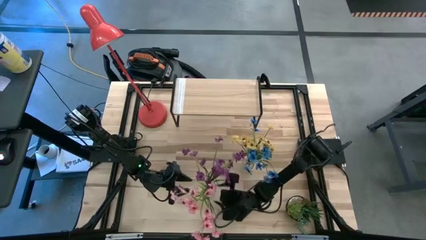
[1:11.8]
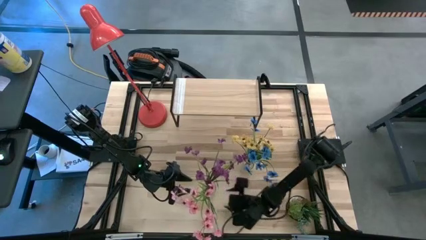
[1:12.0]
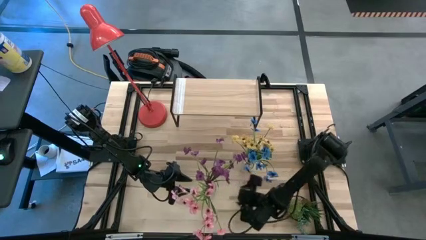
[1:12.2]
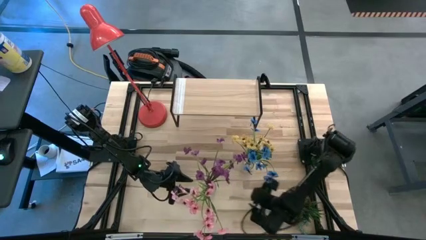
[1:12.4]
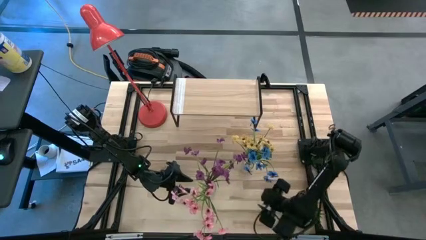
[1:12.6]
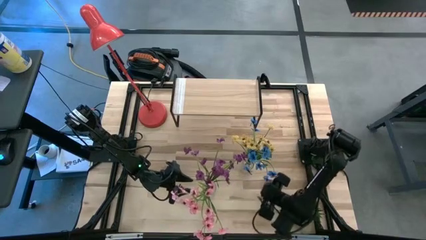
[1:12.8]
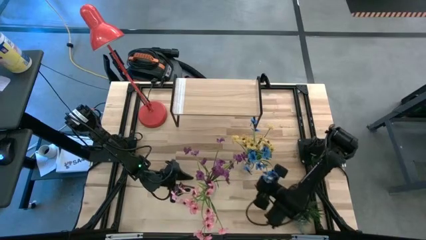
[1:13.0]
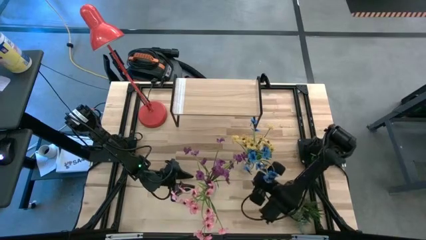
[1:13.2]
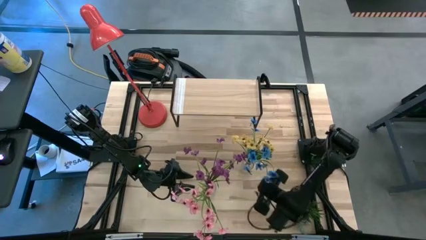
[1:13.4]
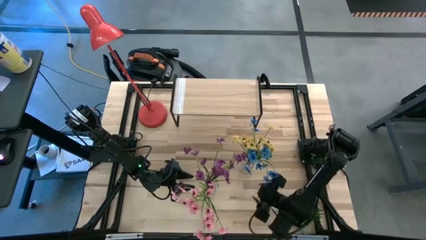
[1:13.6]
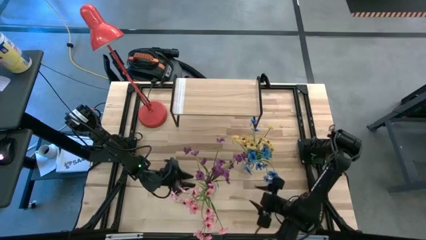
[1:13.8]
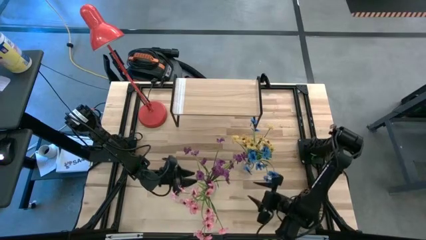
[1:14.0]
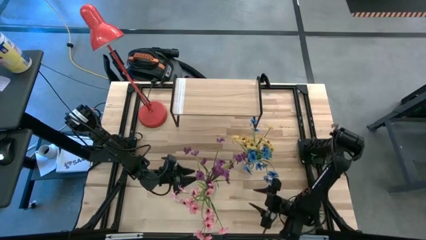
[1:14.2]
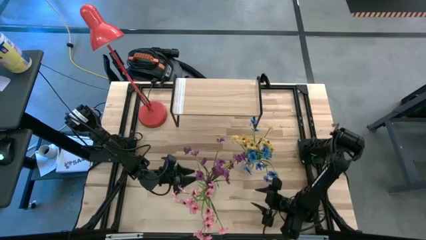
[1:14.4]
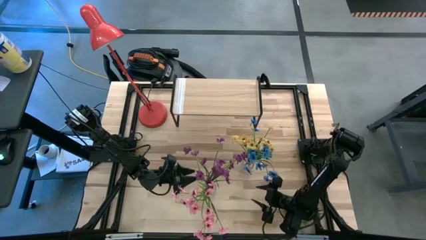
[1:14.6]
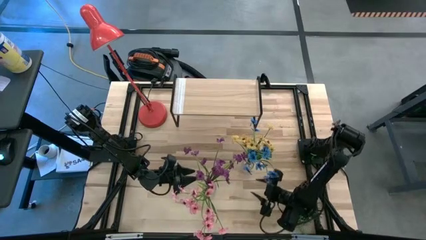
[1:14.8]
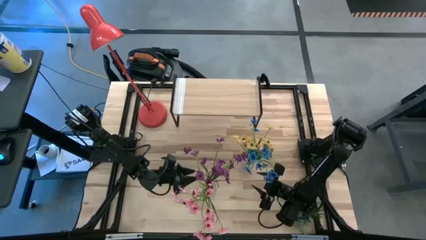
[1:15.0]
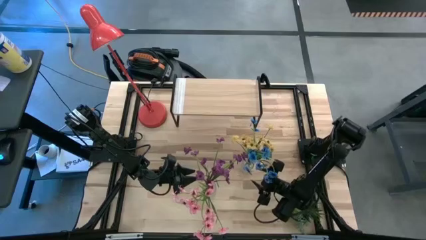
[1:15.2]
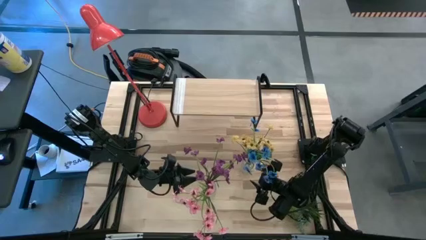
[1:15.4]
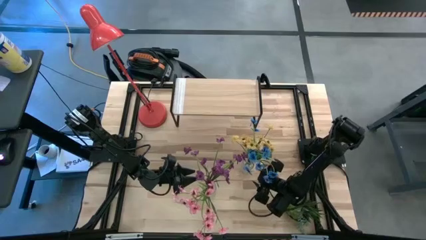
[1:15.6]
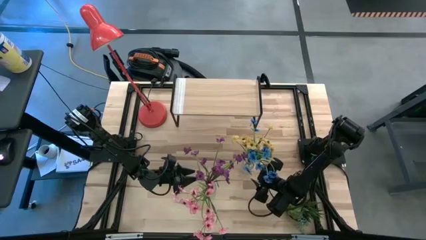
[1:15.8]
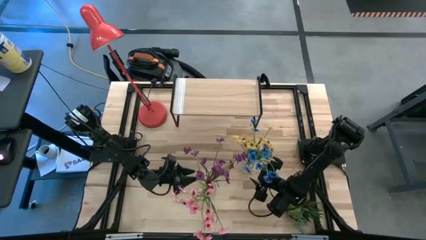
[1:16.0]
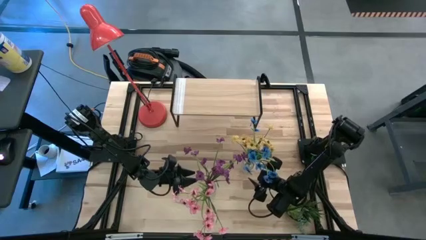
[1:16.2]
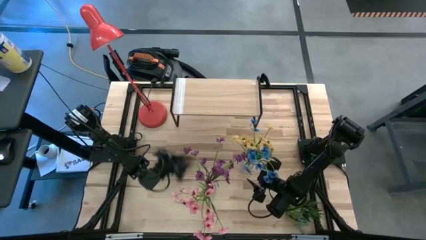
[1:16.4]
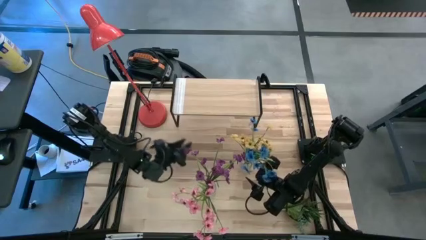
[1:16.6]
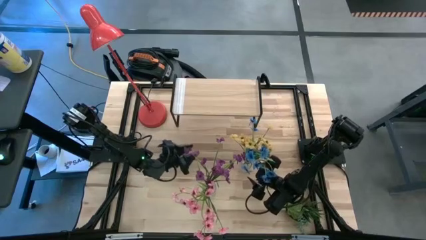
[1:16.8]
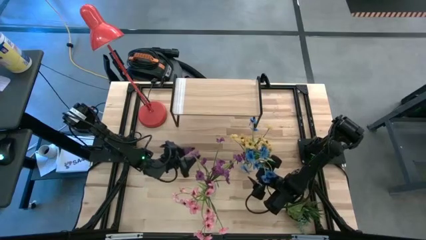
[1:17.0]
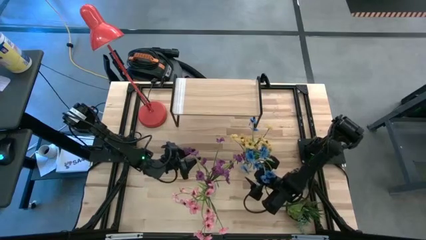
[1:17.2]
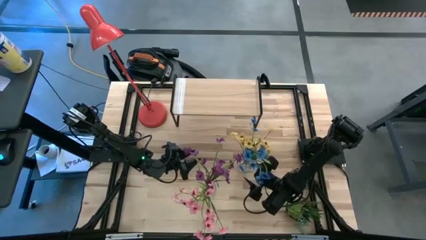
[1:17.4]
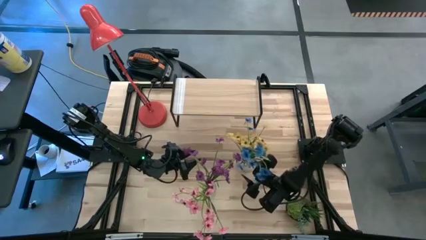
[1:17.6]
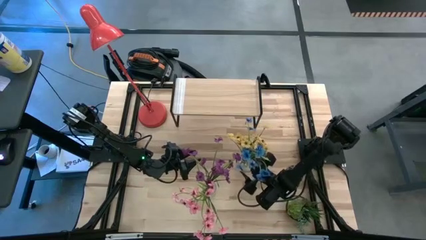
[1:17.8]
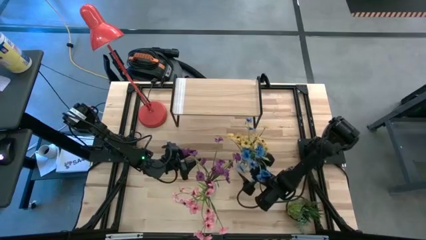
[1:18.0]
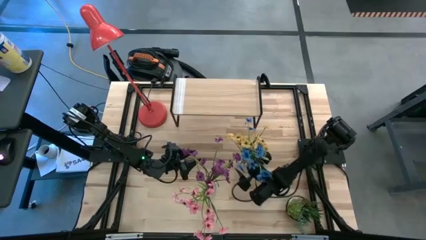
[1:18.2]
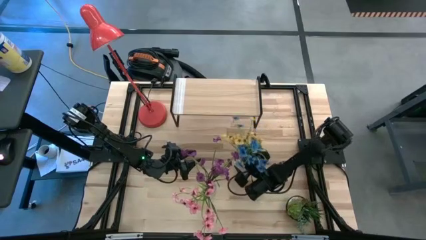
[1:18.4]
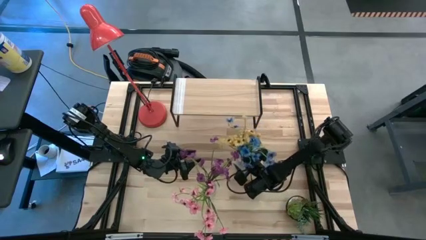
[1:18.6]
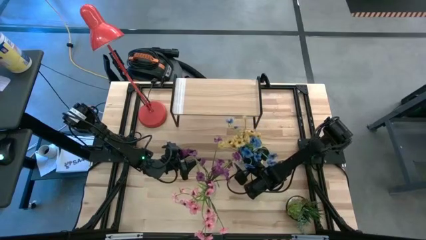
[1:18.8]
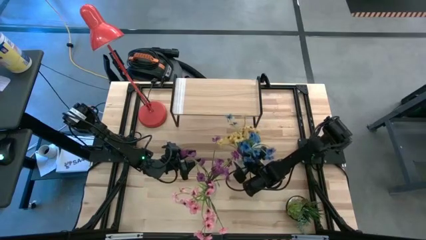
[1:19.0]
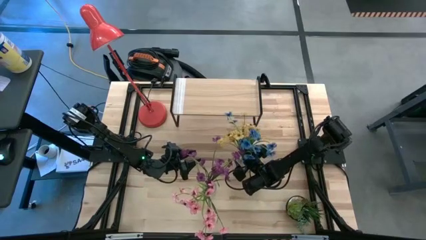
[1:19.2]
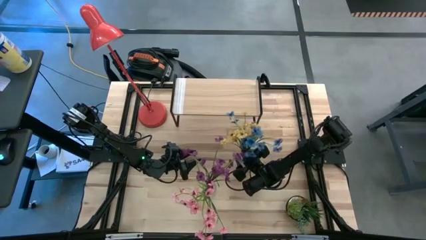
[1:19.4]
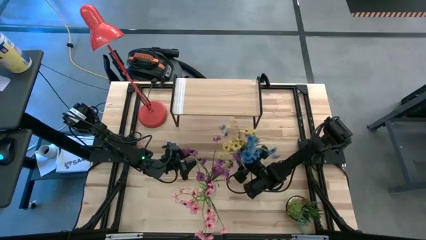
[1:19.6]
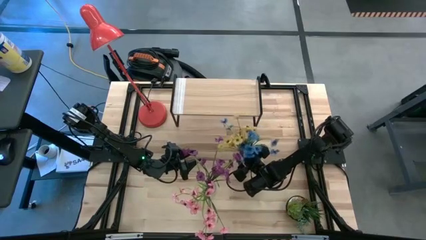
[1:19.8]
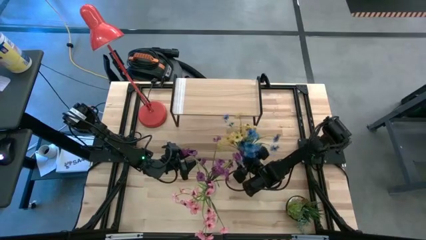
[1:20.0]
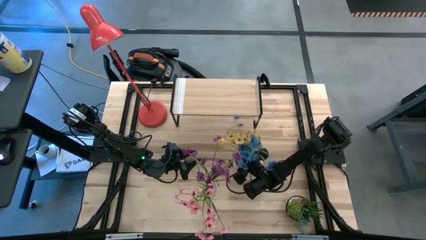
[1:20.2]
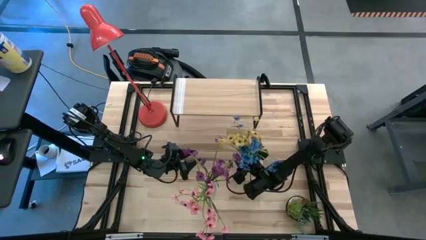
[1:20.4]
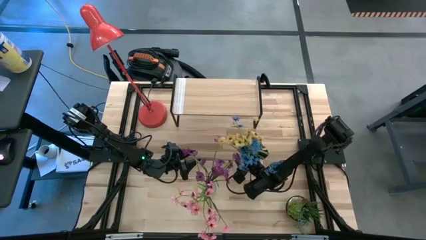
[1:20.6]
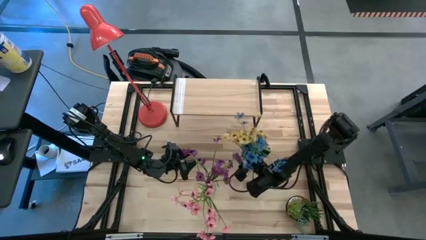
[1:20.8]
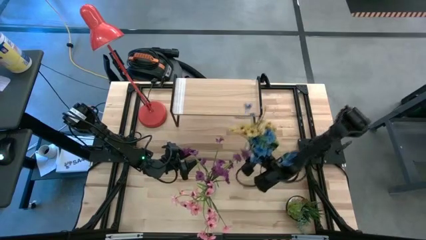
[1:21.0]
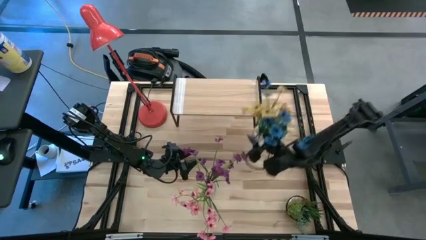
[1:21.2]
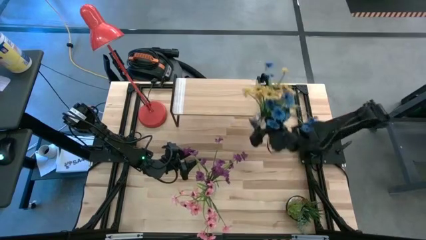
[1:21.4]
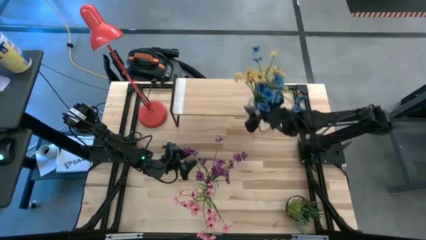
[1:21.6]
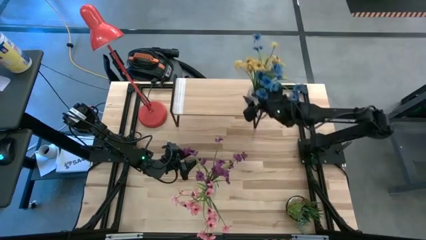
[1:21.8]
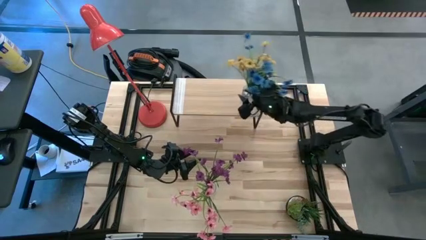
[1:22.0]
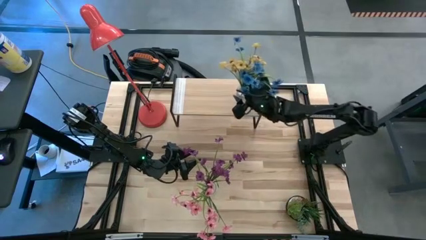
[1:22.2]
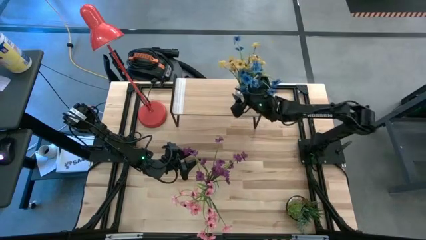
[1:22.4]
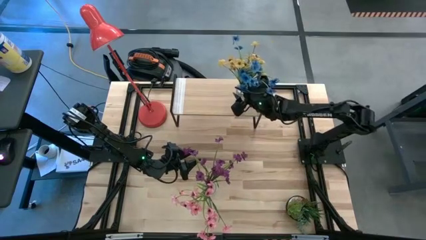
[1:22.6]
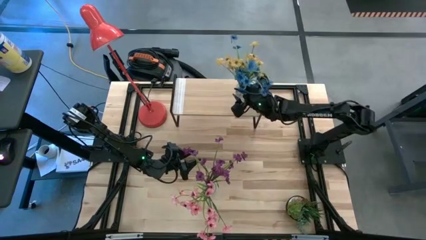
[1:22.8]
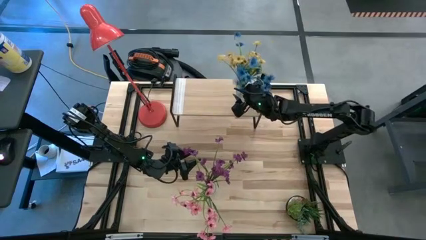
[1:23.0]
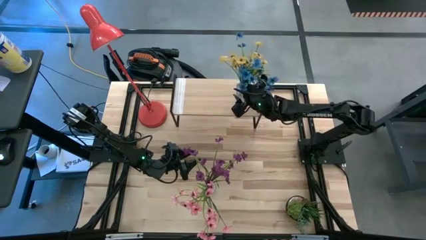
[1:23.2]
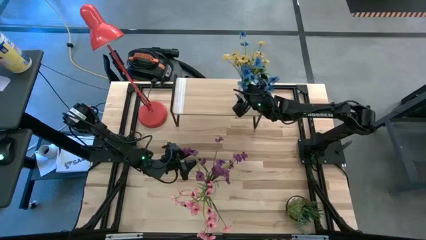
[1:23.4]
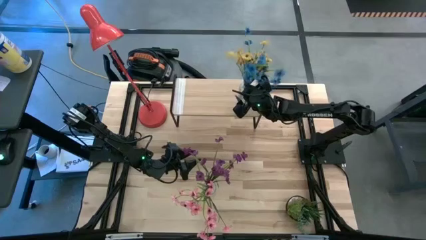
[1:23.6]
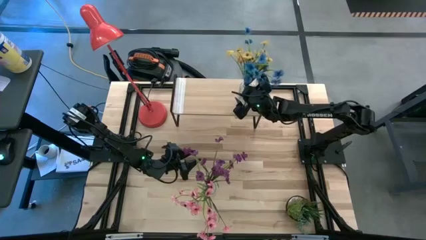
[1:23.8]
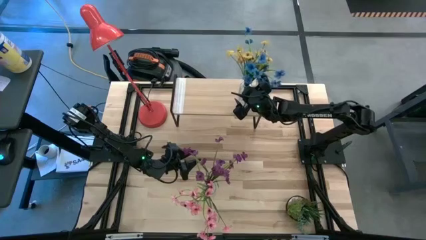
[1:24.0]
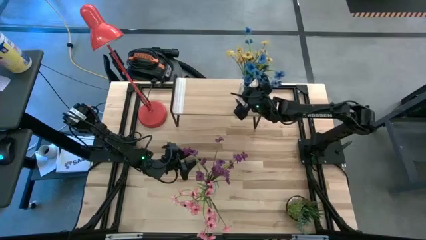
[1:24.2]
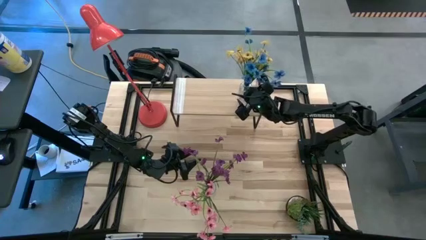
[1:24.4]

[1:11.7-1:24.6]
Task: Pick and place flowers into a vace then onto a shelf
Put the top vase on the shelf

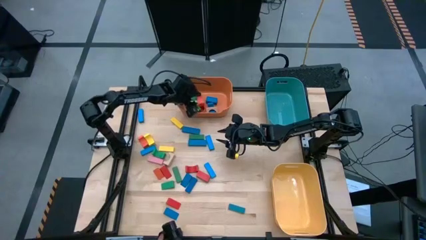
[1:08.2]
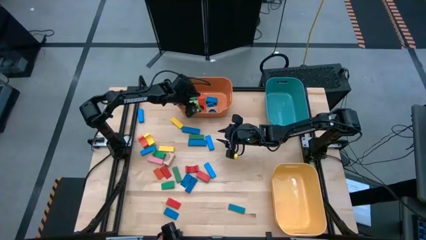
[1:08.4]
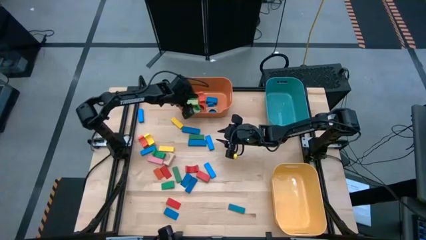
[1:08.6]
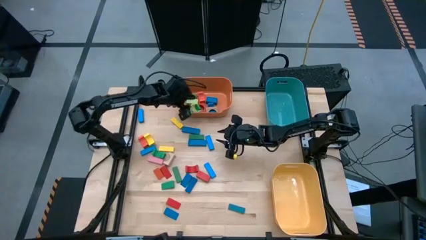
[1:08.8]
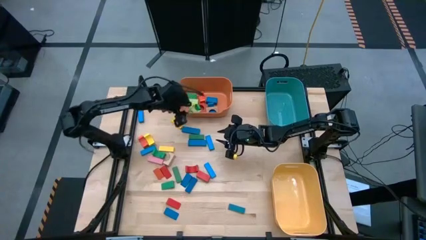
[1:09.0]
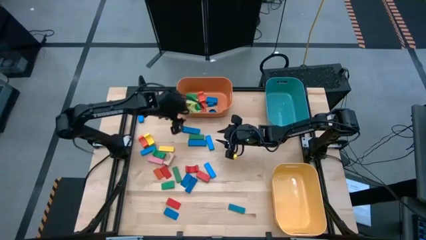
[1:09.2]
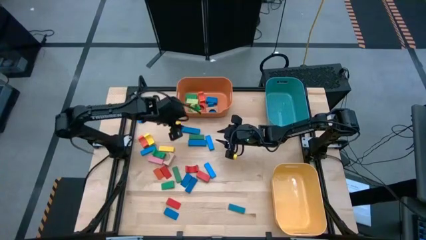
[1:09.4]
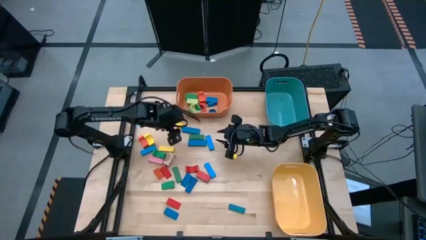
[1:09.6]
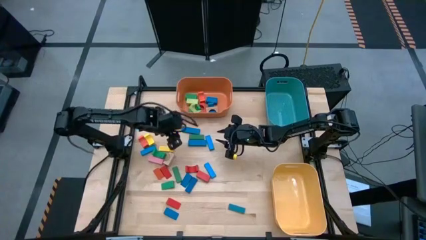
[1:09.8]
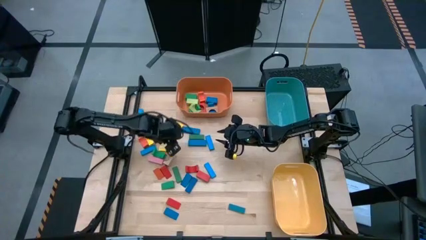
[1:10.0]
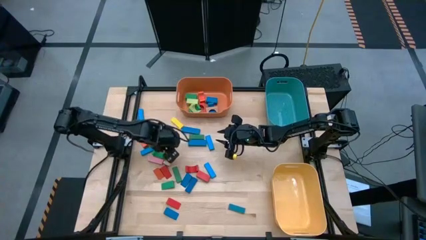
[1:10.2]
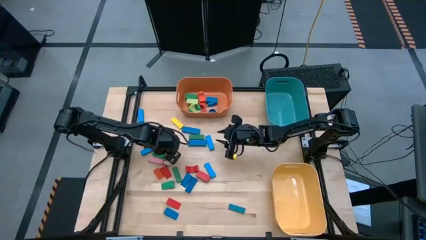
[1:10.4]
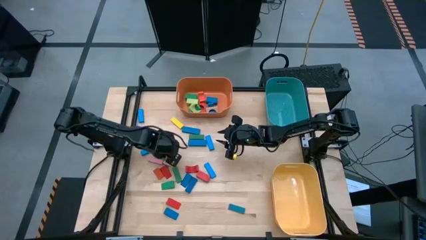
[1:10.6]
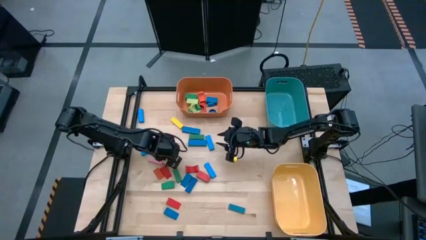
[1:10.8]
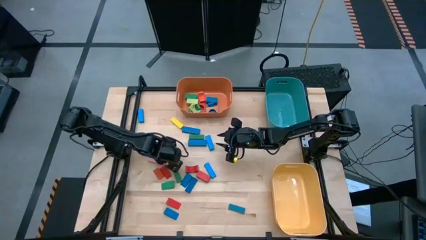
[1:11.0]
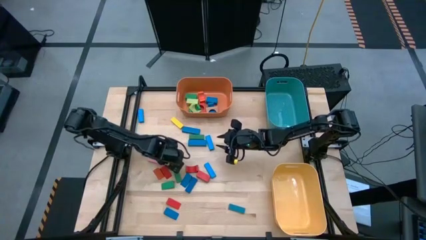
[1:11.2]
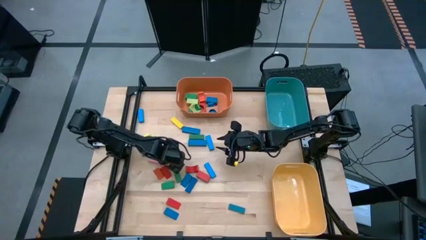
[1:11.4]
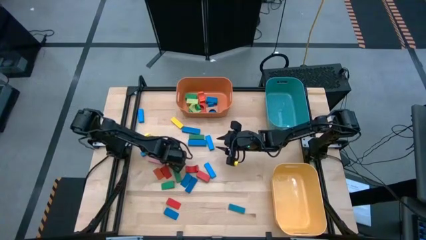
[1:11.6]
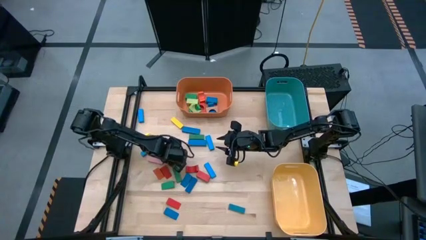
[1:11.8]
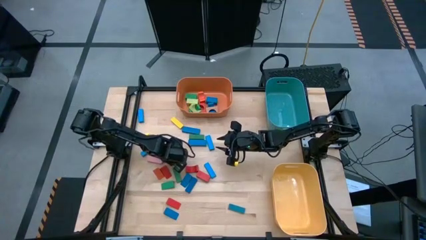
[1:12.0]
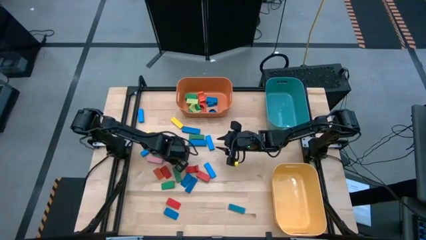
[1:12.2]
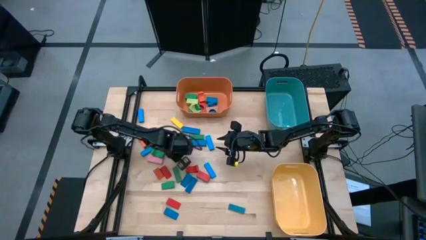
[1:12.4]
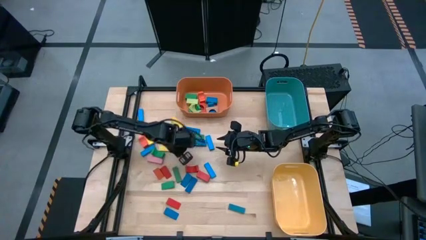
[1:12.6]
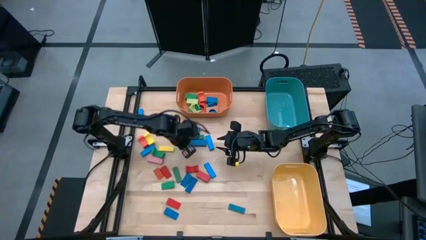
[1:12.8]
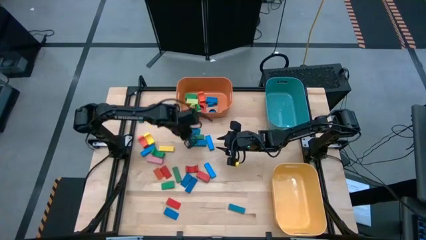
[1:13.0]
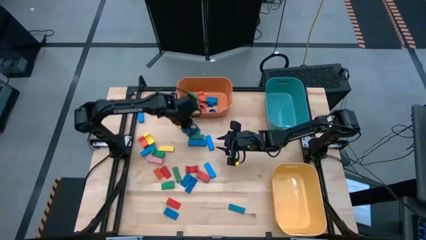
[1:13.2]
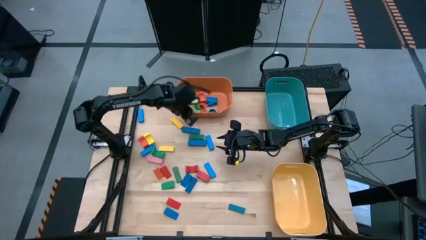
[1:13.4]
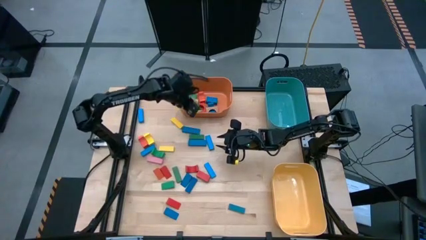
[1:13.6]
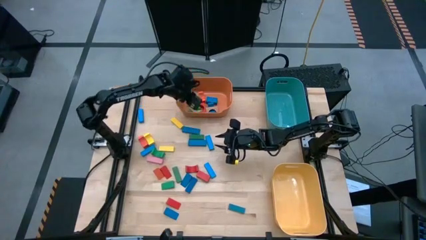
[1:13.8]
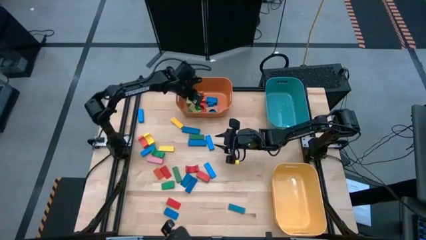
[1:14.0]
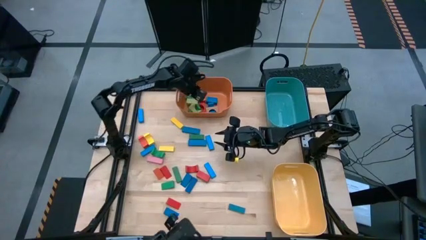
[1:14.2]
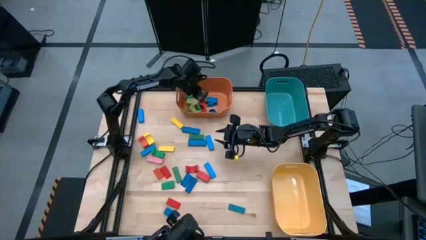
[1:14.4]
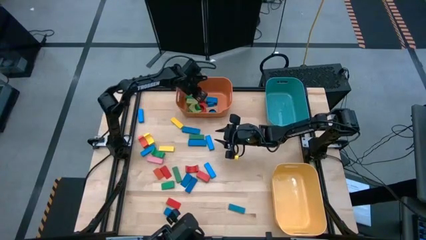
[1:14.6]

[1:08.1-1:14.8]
Task: Sort blocks by size
Put the brown arch block into the orange bin
